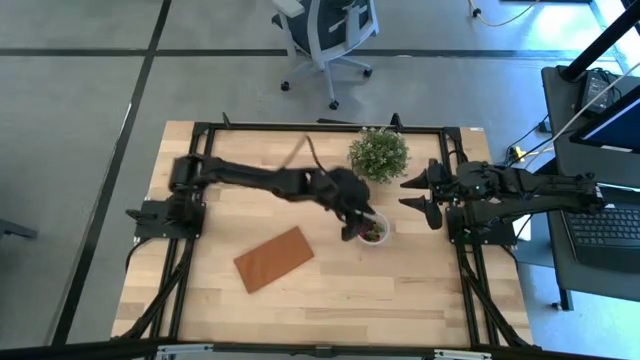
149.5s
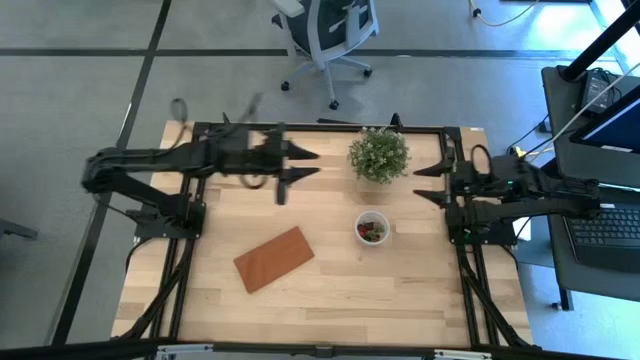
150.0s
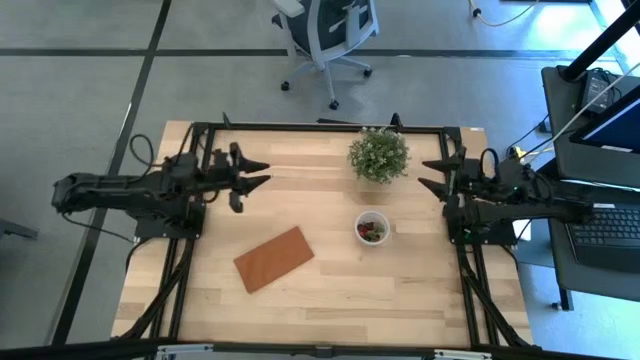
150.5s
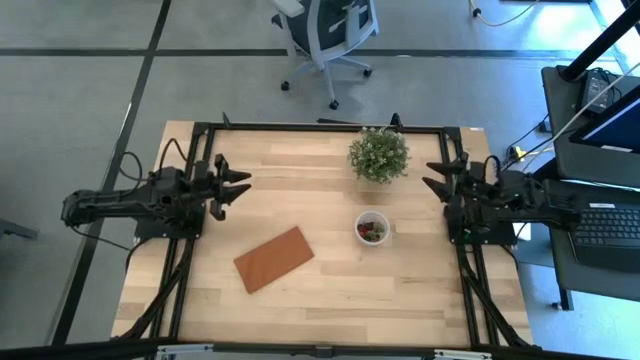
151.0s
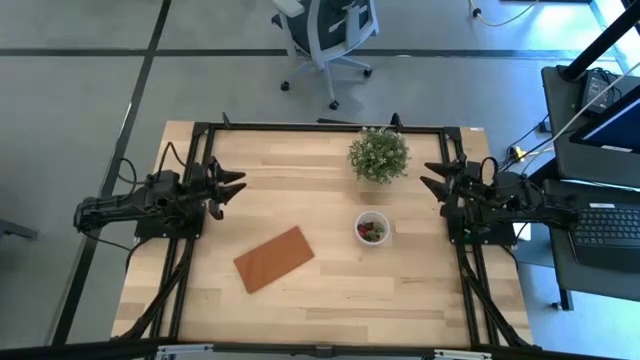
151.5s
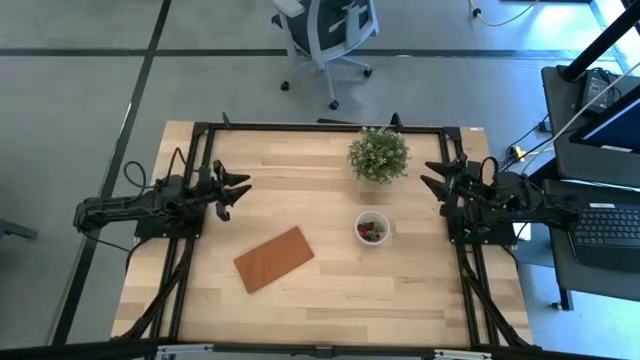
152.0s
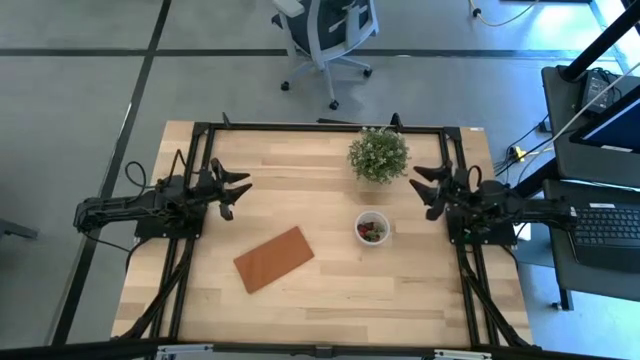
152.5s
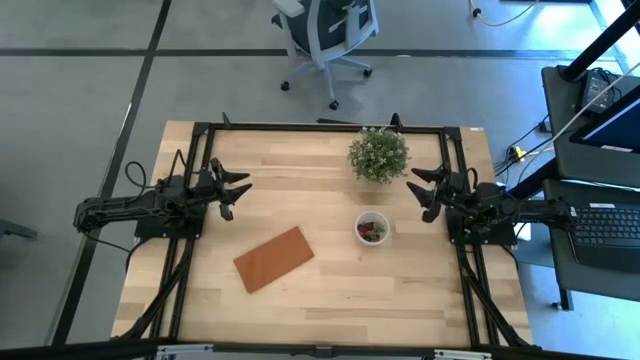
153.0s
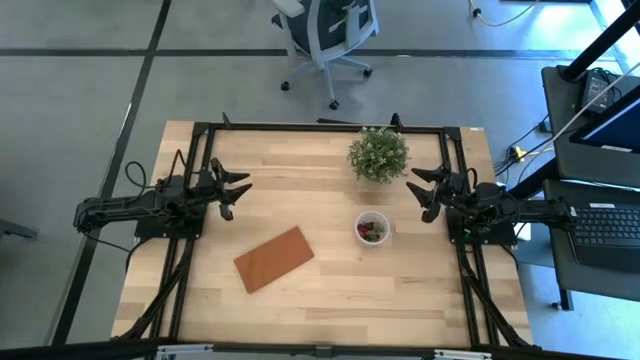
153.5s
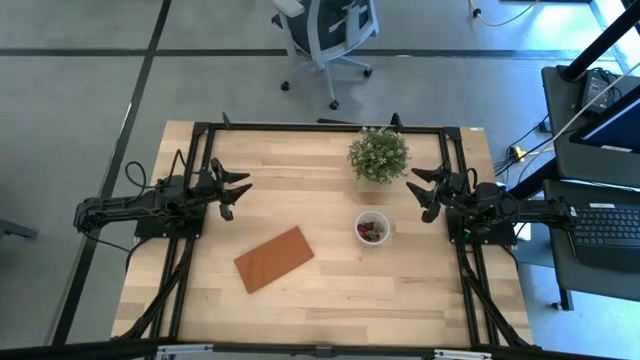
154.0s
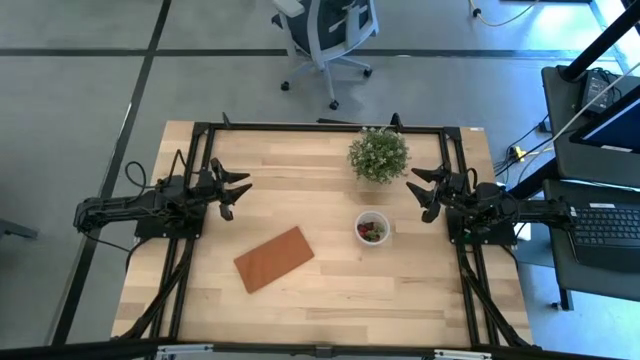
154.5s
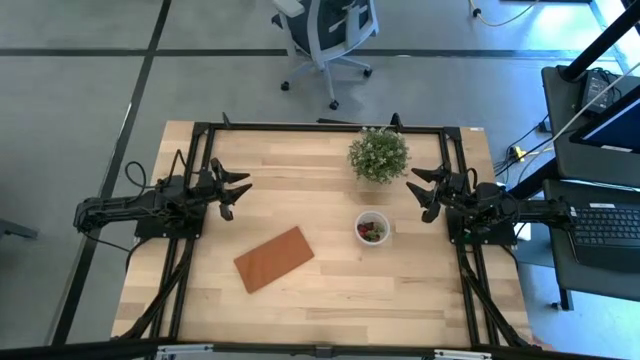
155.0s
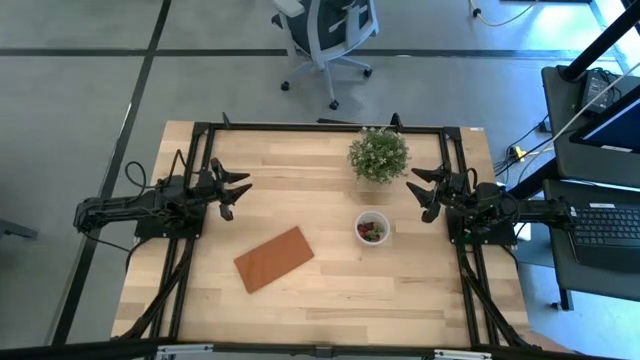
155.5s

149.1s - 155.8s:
Task: Pick and placing Produce into tupperware
Return to Home Position

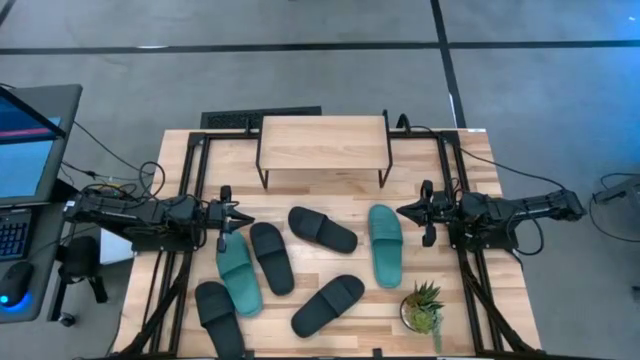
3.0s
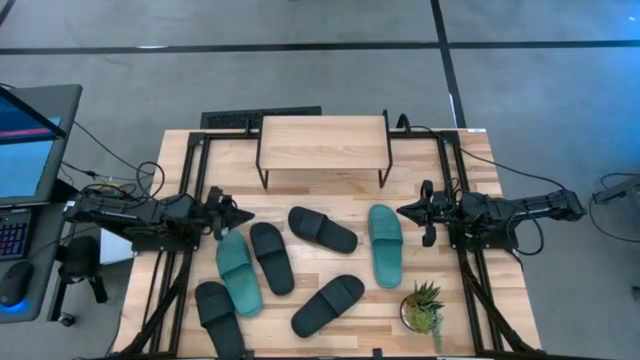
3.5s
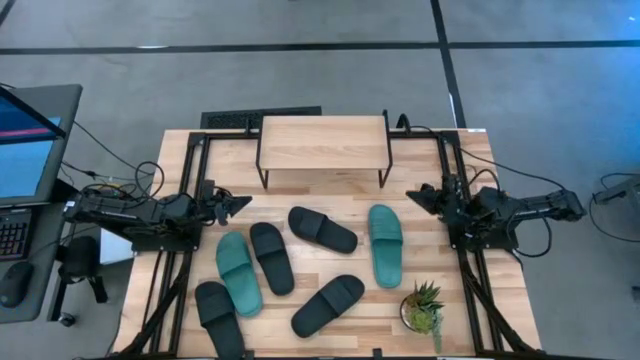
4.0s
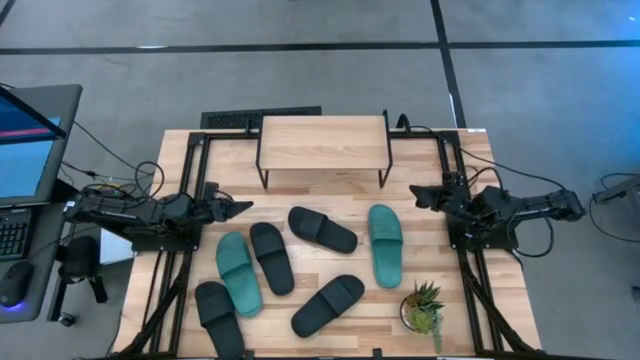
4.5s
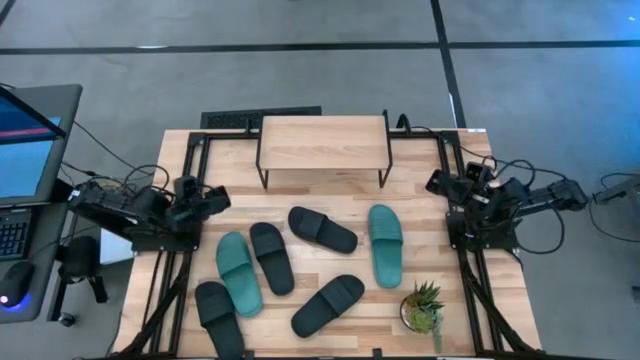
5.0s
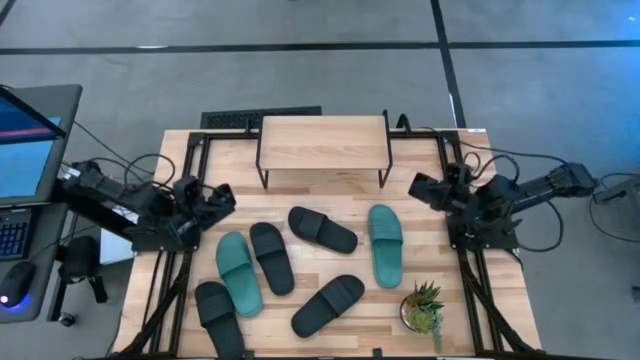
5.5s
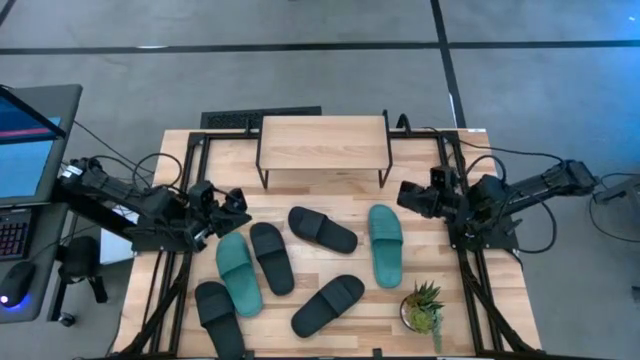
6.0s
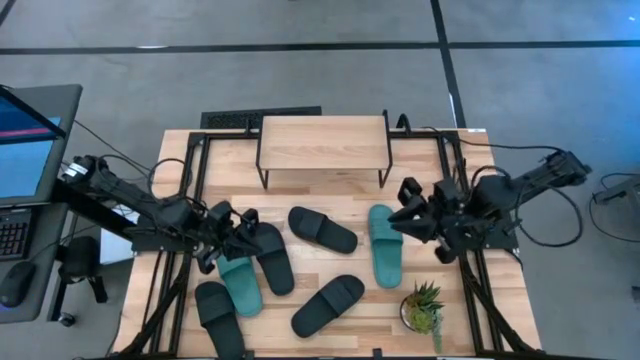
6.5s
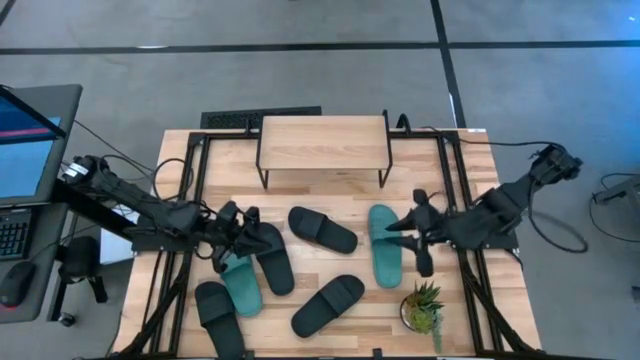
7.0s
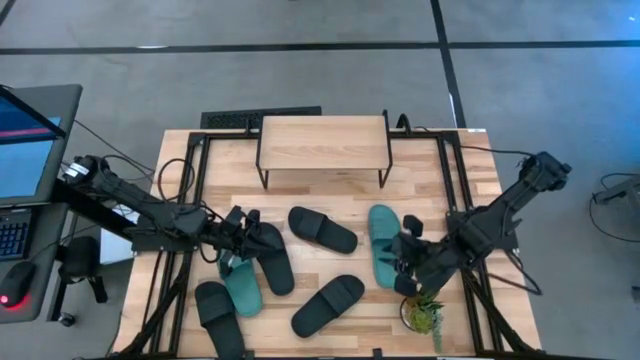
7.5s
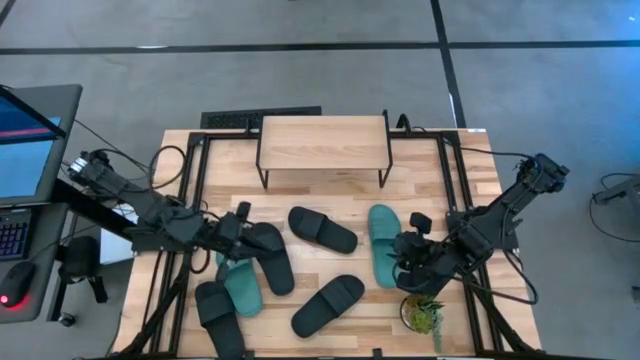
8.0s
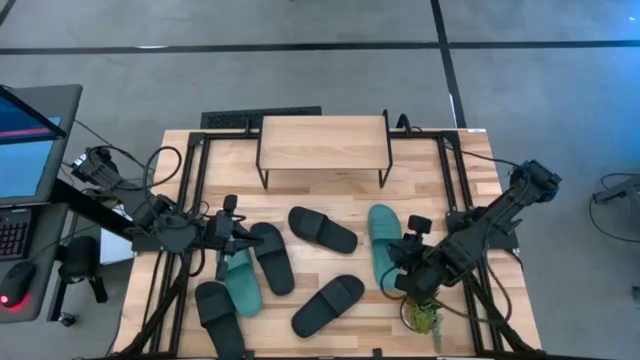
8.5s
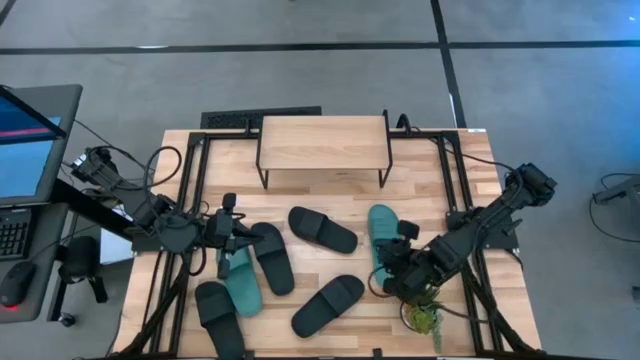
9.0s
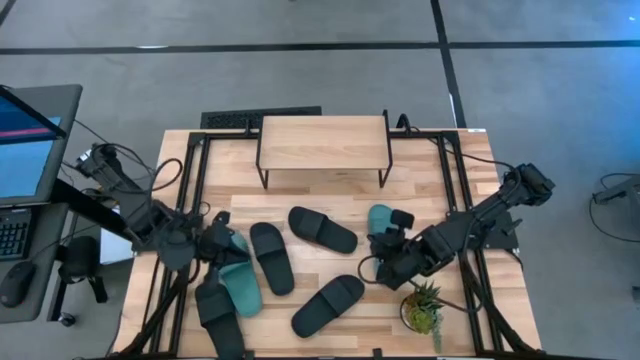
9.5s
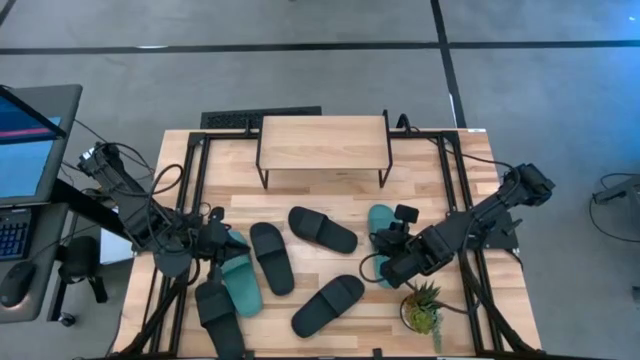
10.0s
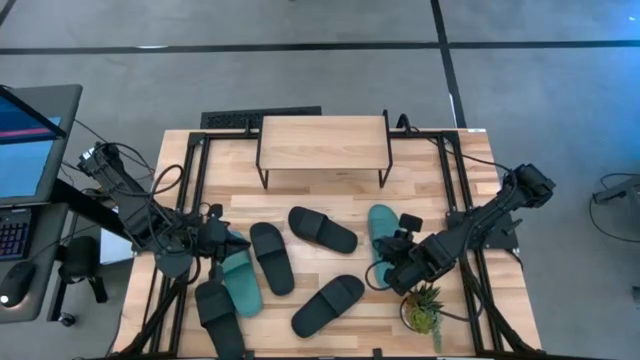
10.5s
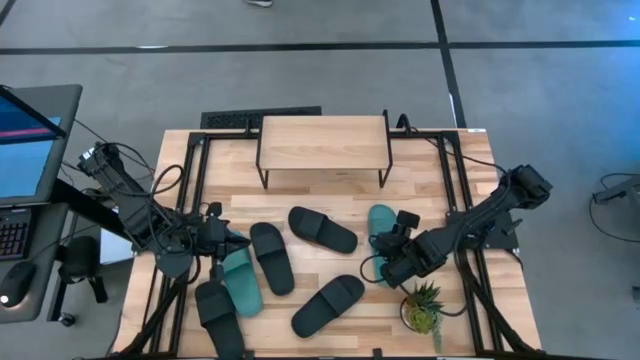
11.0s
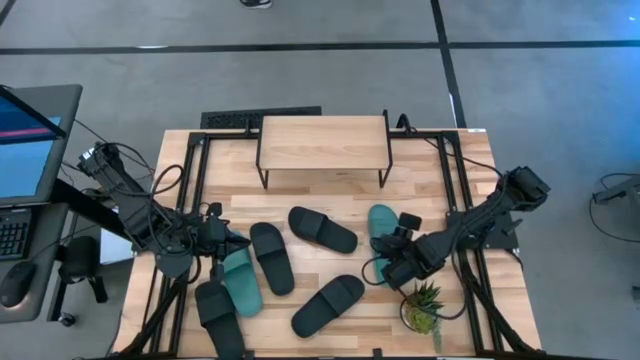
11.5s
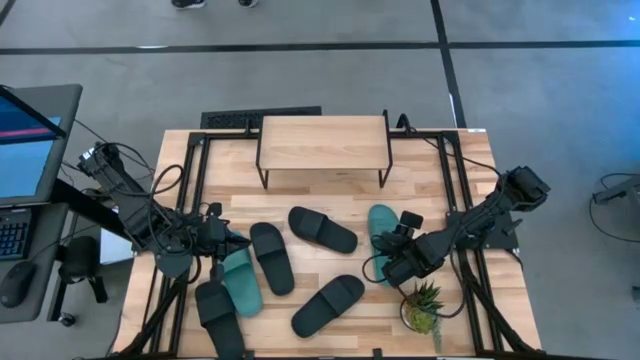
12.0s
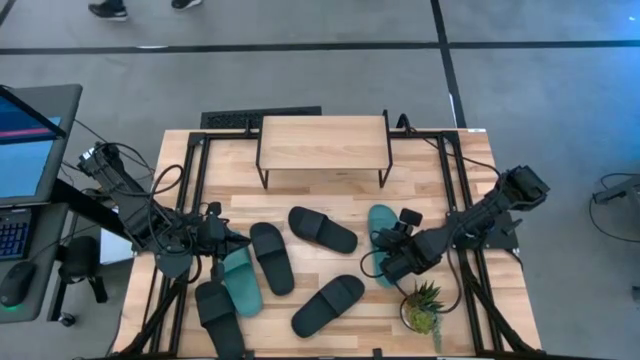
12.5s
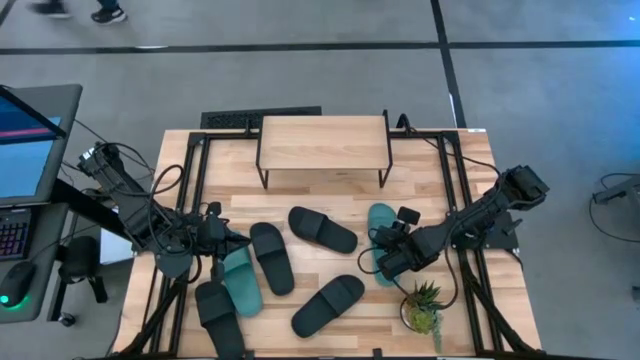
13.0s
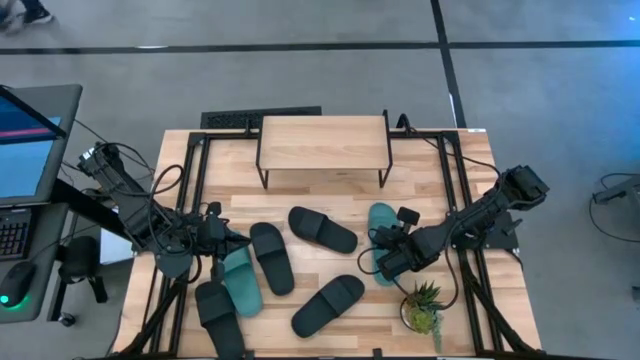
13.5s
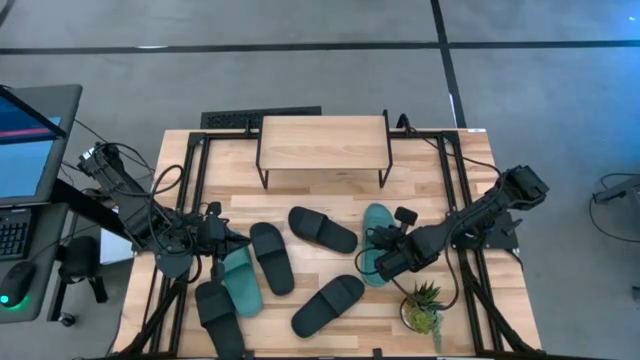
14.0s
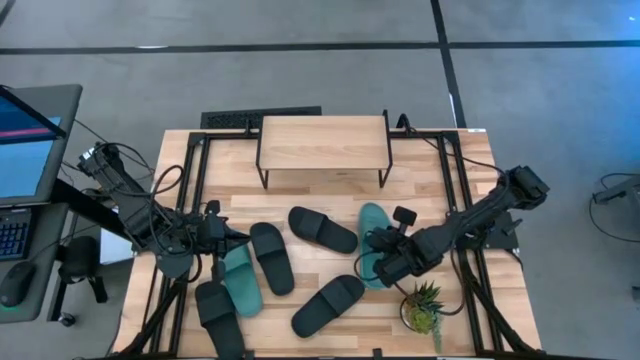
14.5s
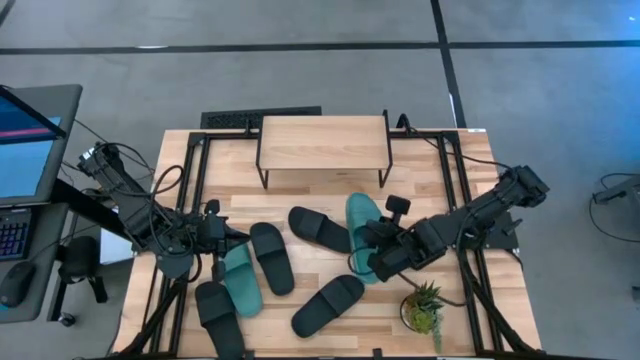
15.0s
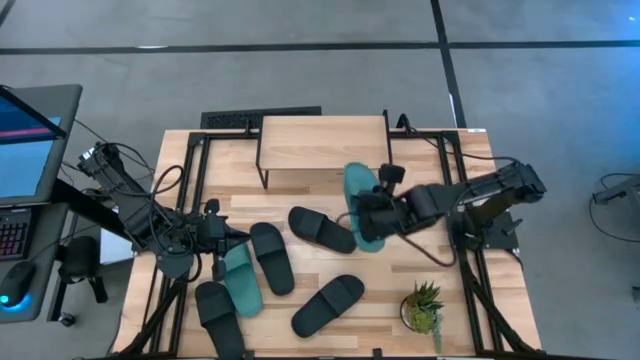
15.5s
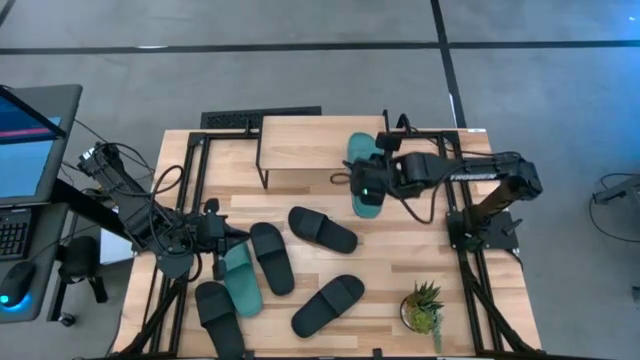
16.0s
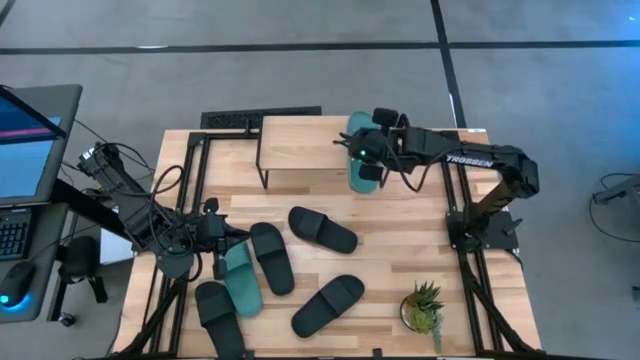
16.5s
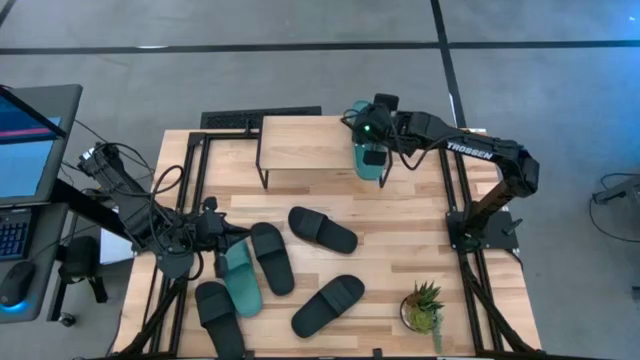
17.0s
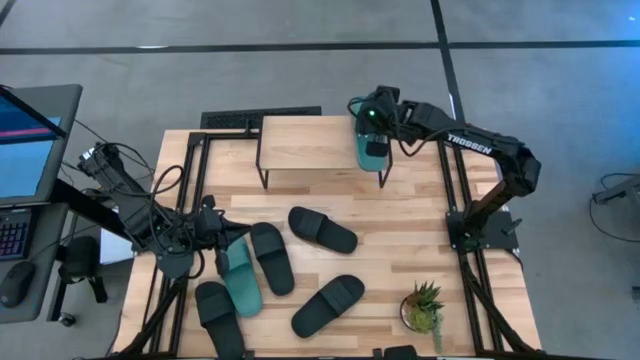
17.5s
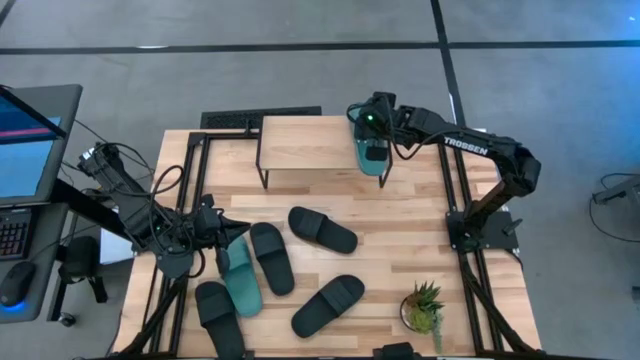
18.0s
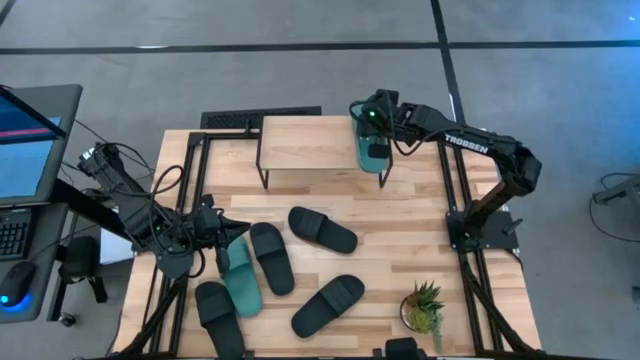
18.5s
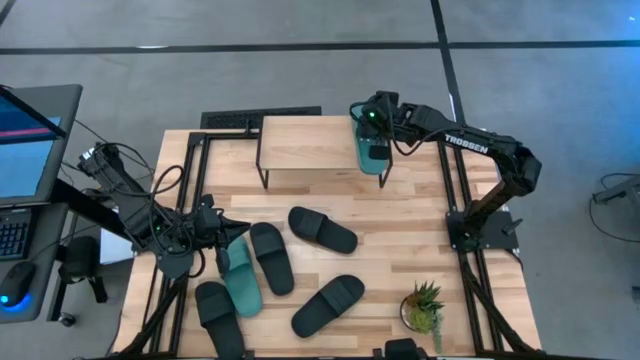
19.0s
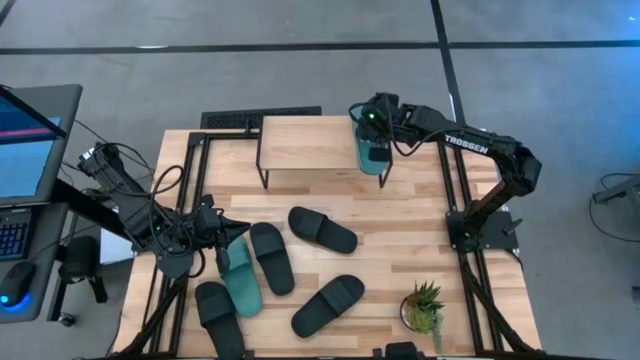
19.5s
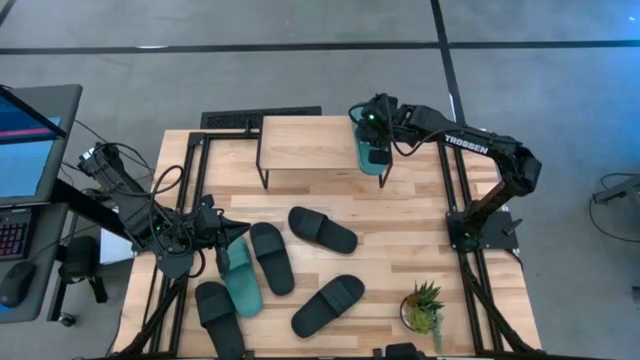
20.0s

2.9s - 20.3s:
Task: Pick and place slides into the shelf
Put the blue slipper on the shelf
